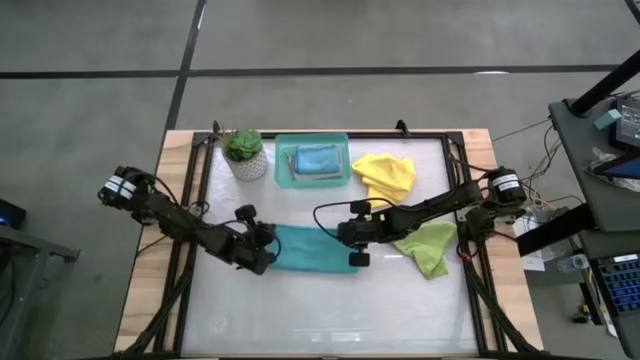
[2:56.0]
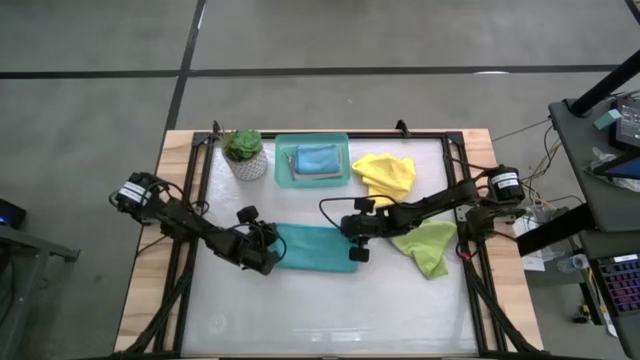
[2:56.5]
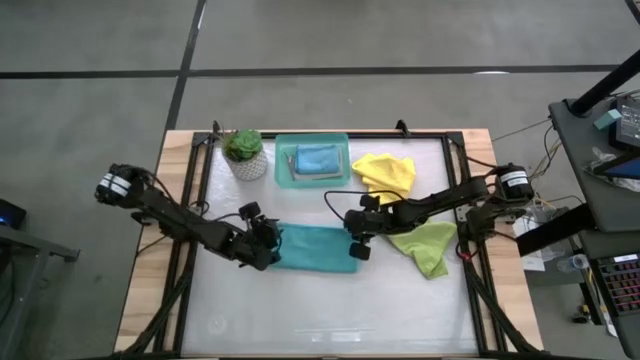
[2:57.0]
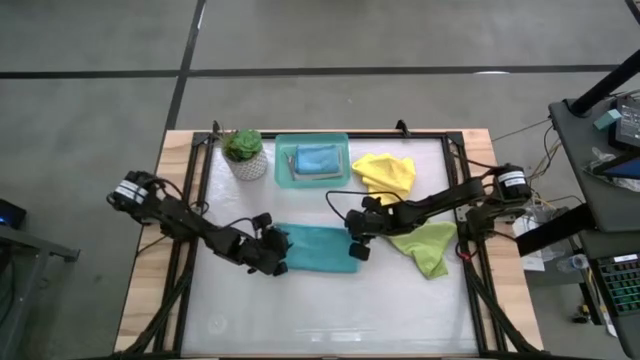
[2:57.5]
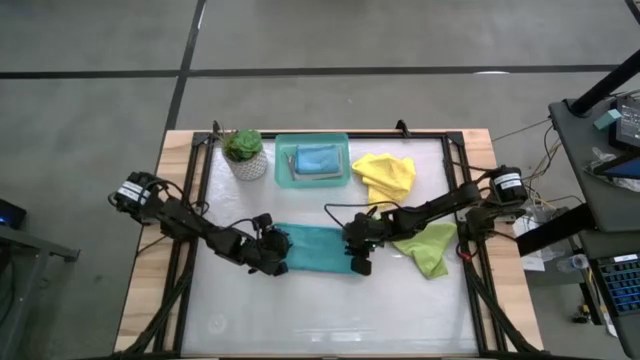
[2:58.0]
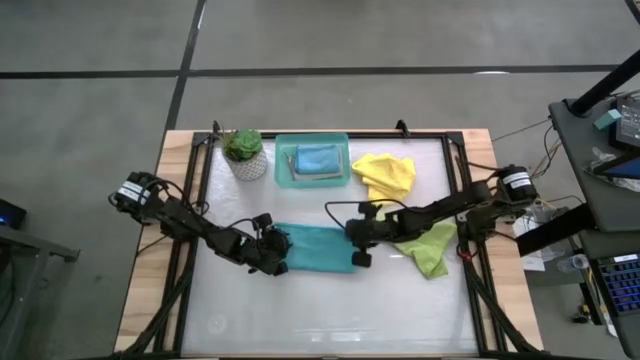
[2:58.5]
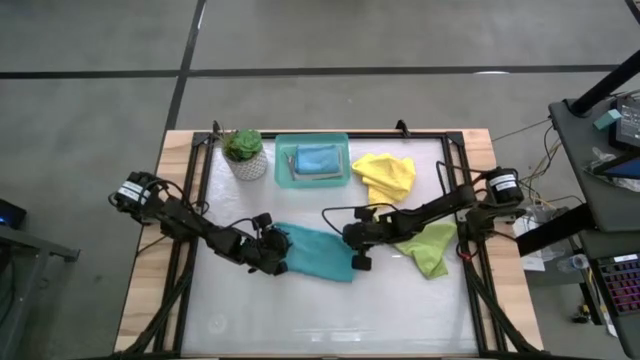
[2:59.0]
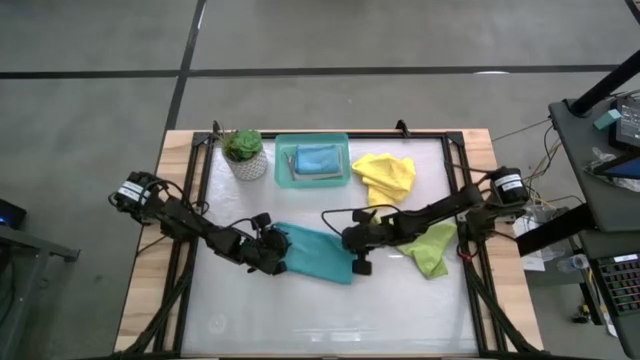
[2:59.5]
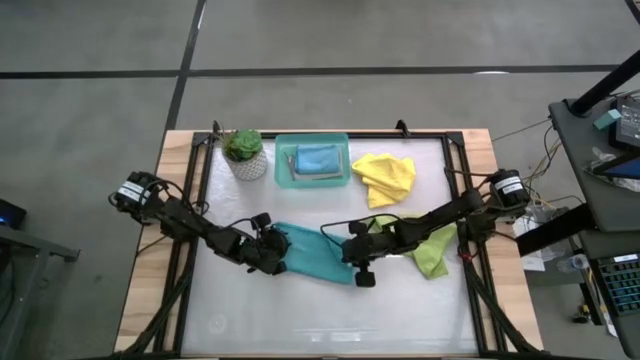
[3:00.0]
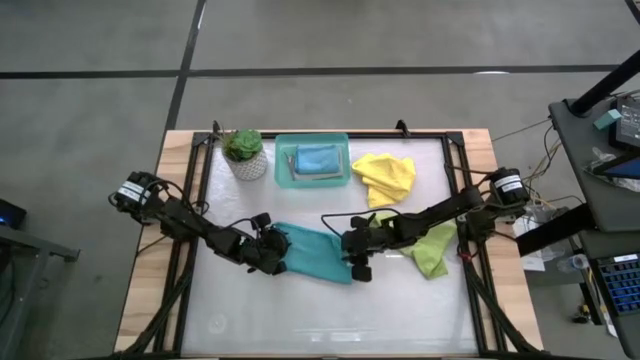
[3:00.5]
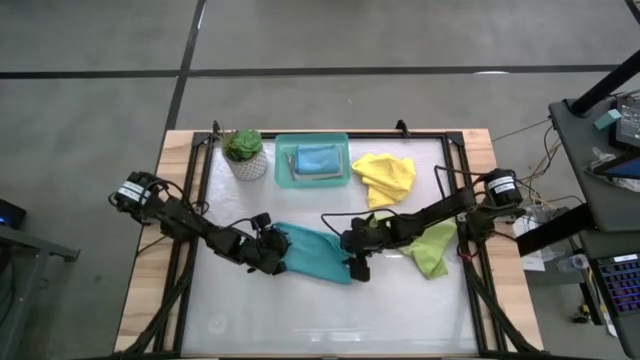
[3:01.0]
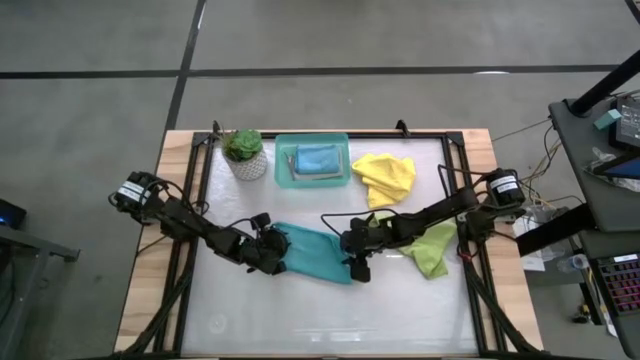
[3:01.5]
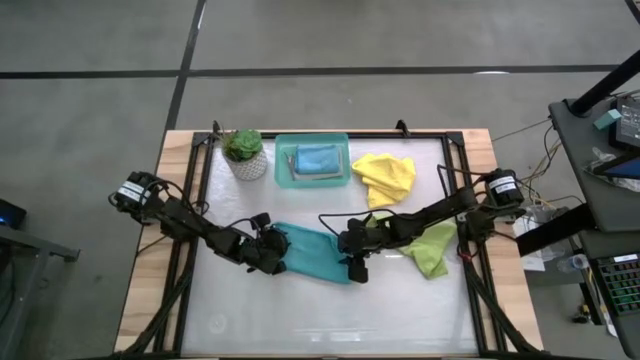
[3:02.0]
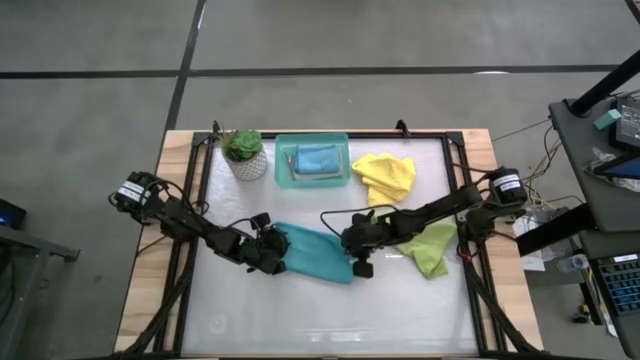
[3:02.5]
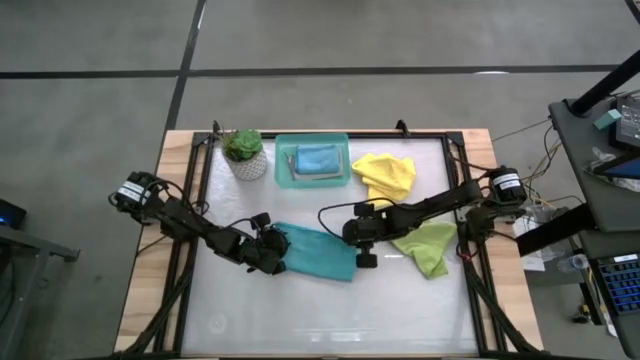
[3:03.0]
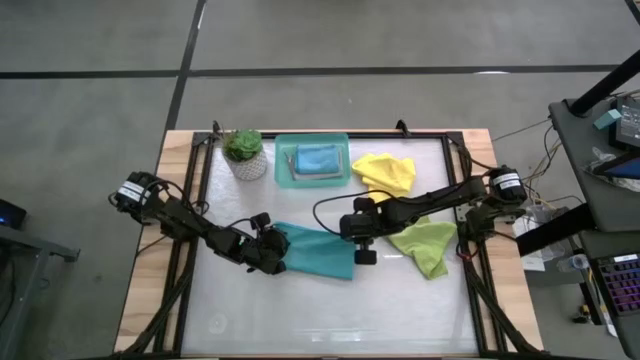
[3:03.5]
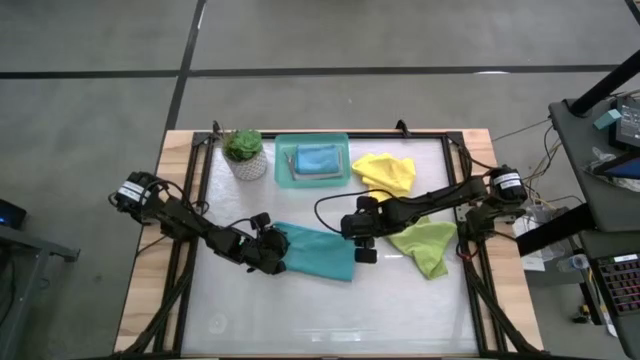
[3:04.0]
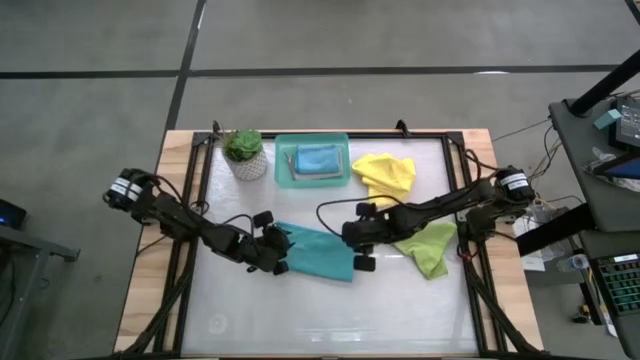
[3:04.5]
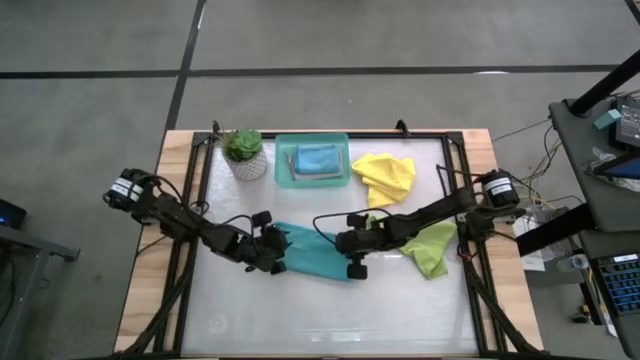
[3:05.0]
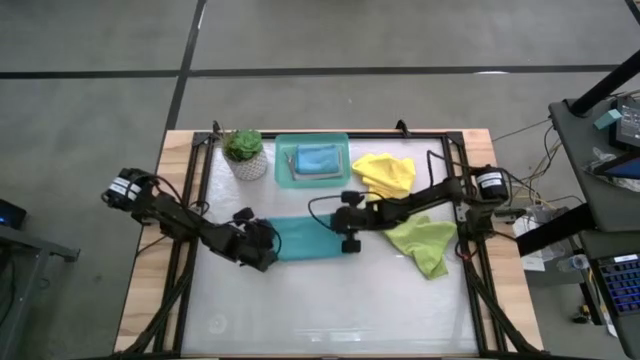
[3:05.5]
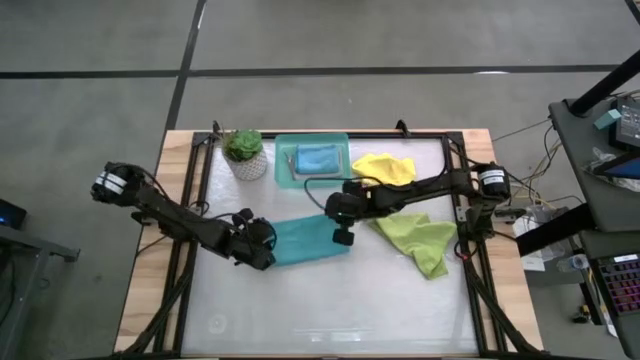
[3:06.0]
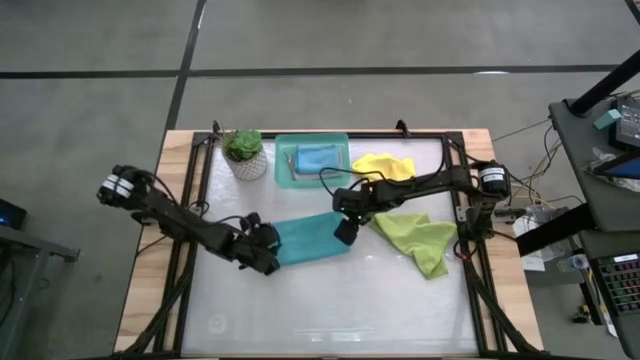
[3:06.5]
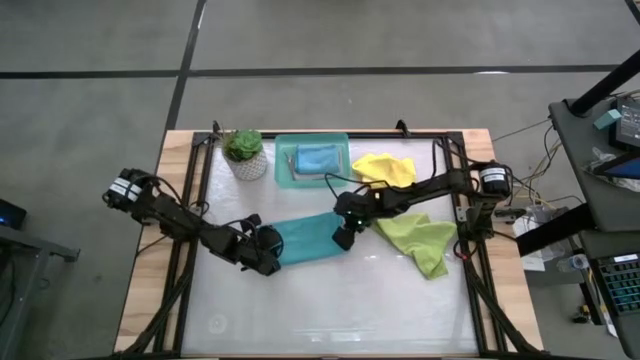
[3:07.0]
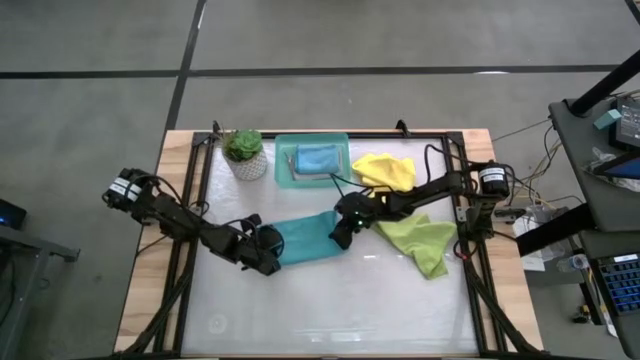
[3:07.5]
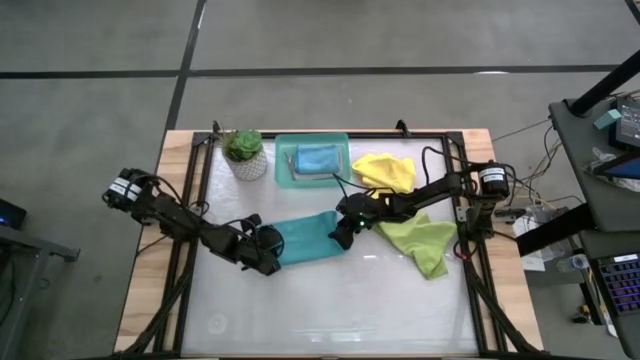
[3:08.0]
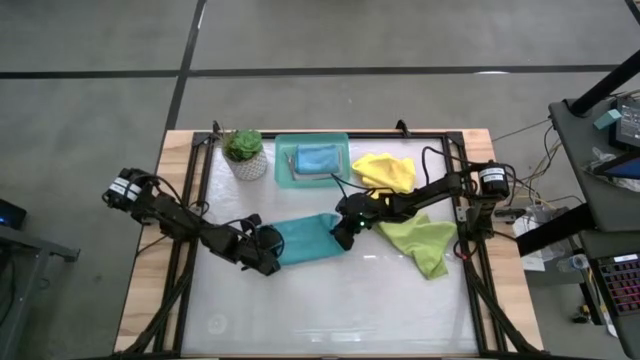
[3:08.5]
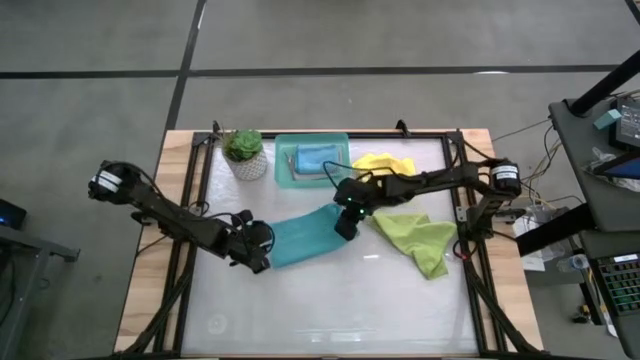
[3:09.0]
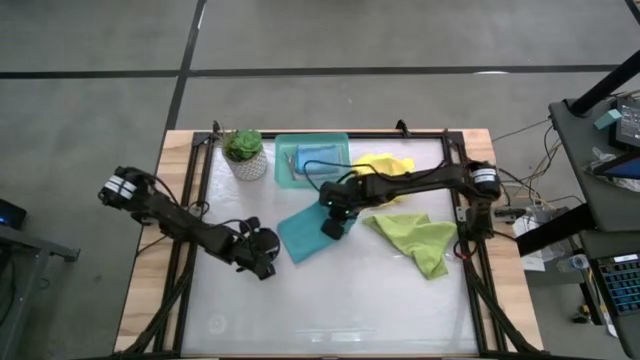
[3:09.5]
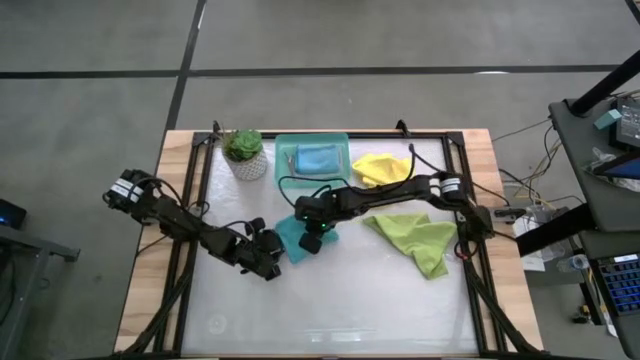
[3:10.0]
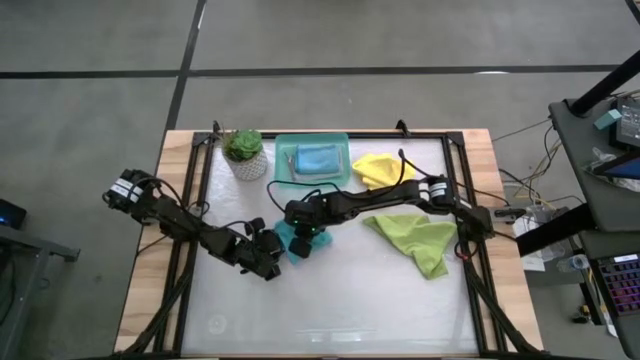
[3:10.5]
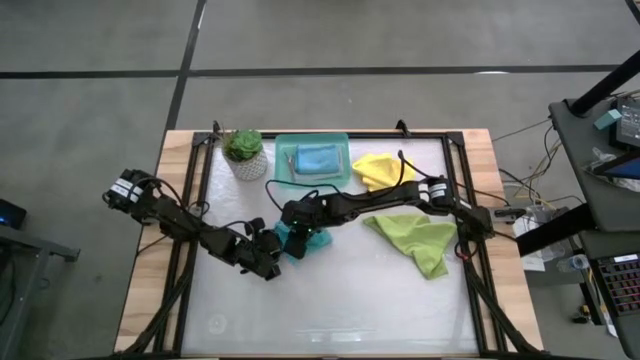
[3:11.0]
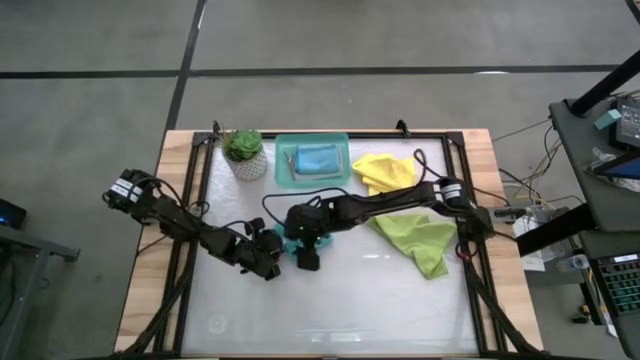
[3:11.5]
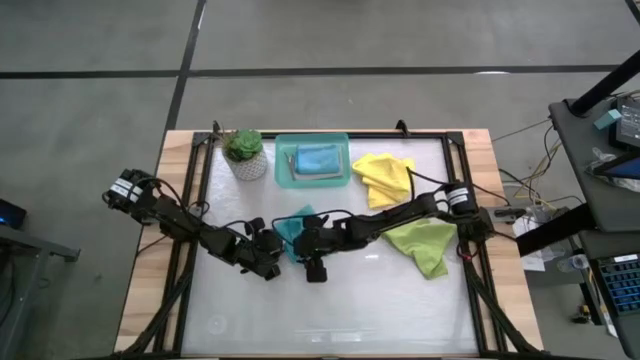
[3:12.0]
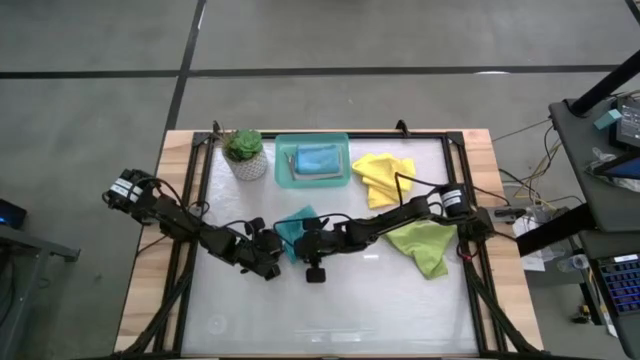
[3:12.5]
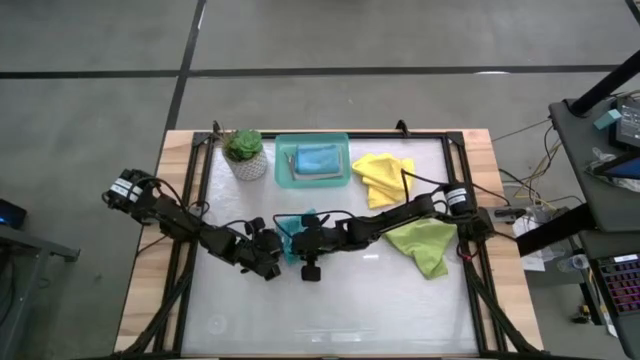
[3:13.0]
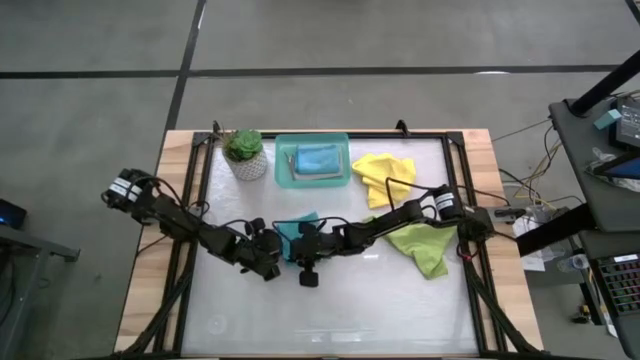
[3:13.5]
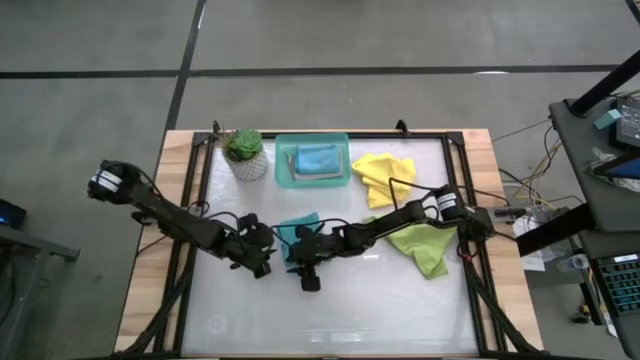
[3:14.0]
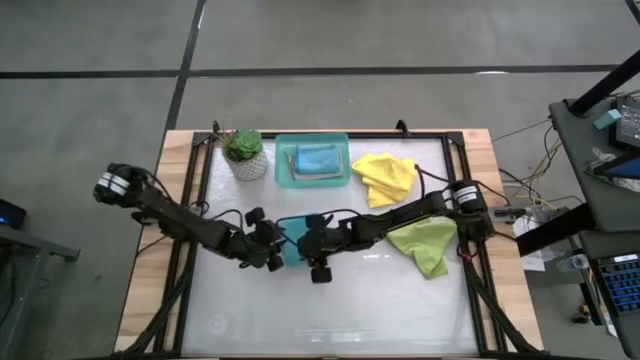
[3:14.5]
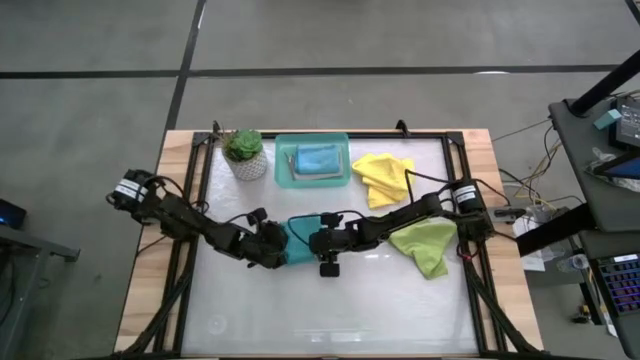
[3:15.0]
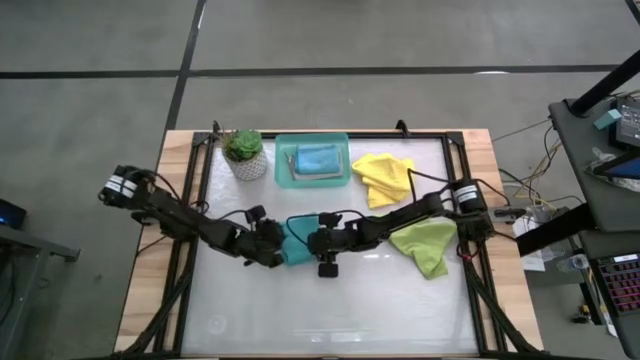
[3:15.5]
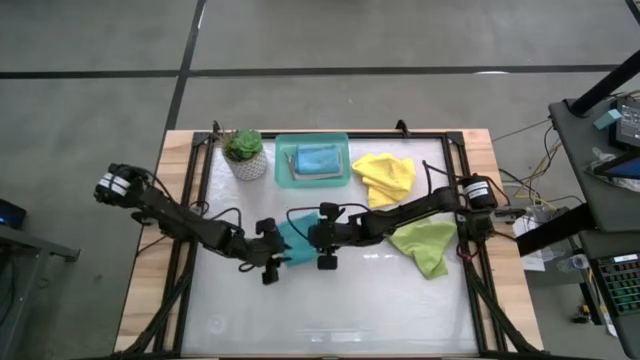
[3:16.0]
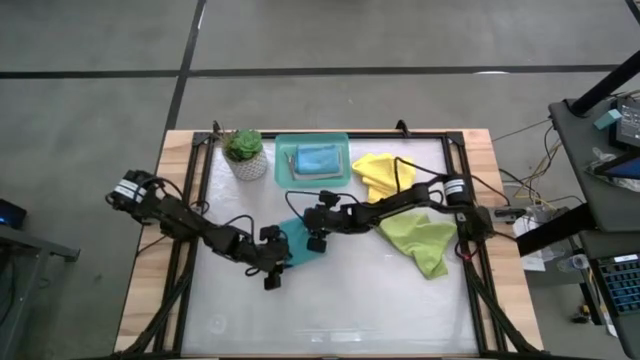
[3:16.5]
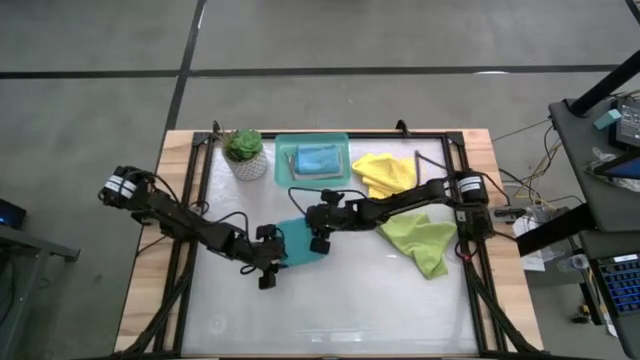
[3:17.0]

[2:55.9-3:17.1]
Task: Fold microfiber towels
Fold the light blue microfiber cloth
